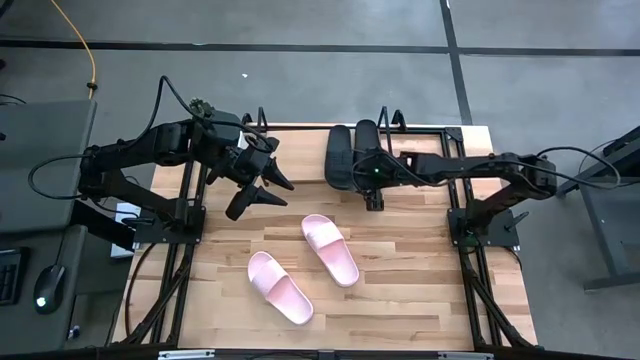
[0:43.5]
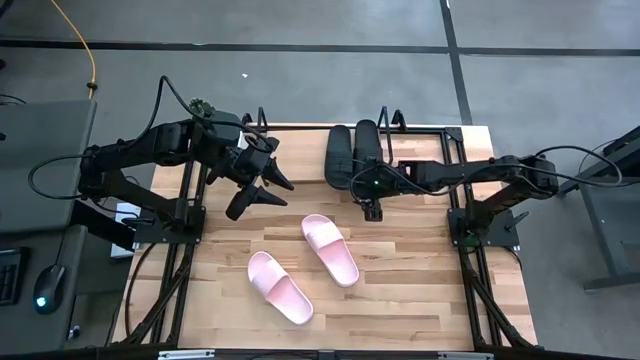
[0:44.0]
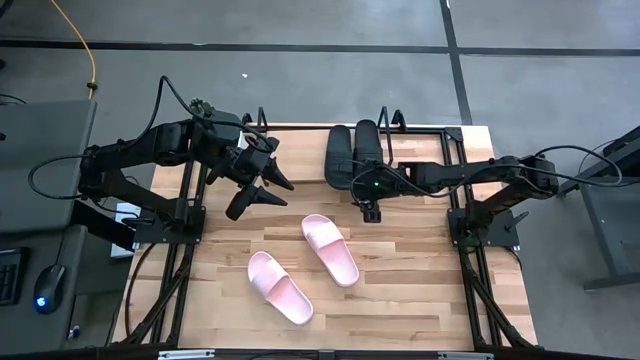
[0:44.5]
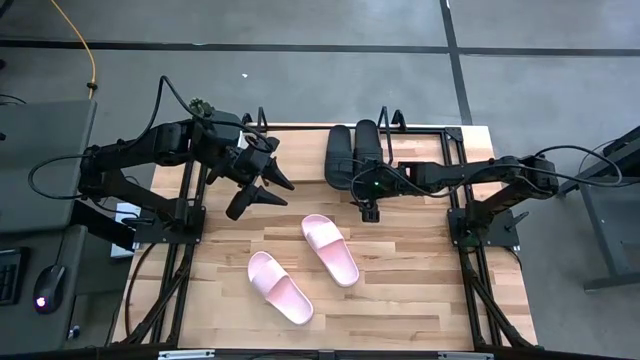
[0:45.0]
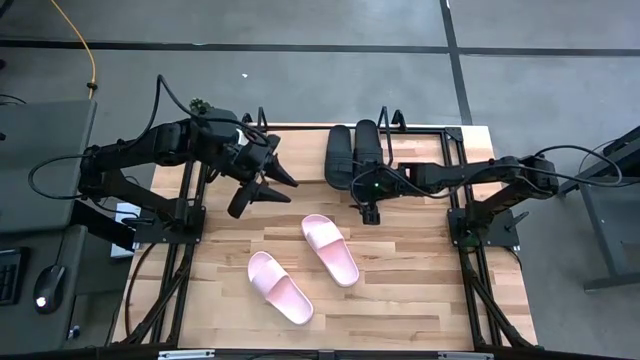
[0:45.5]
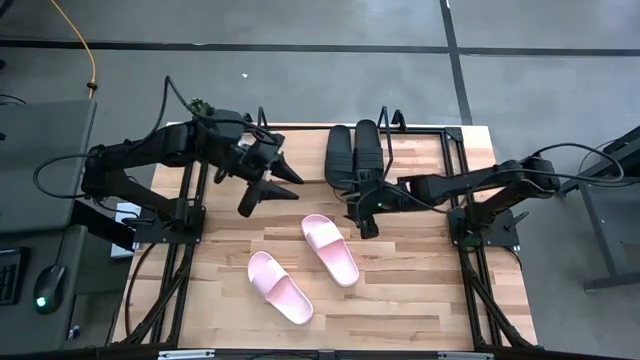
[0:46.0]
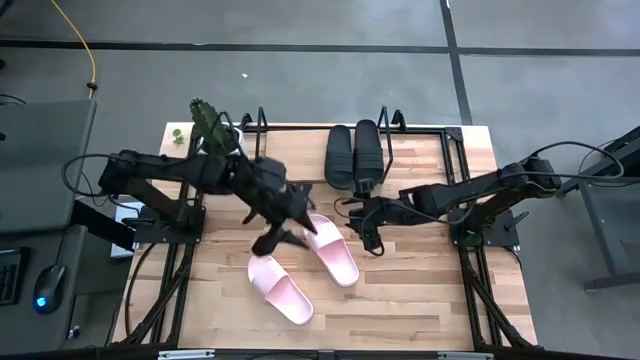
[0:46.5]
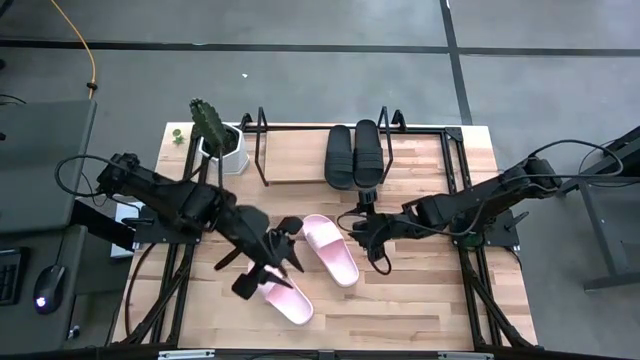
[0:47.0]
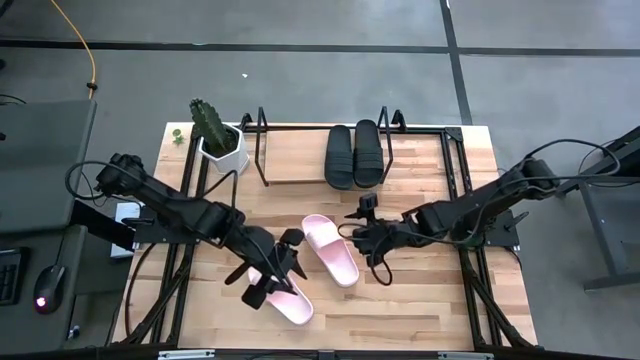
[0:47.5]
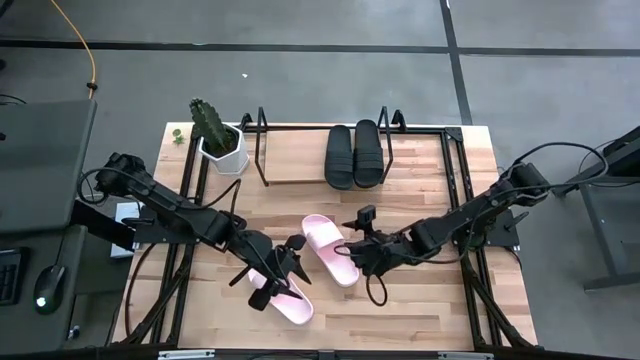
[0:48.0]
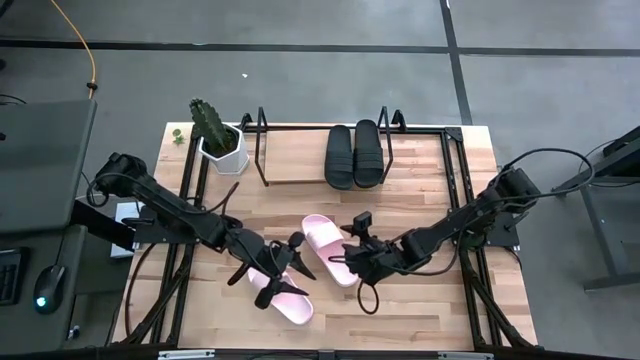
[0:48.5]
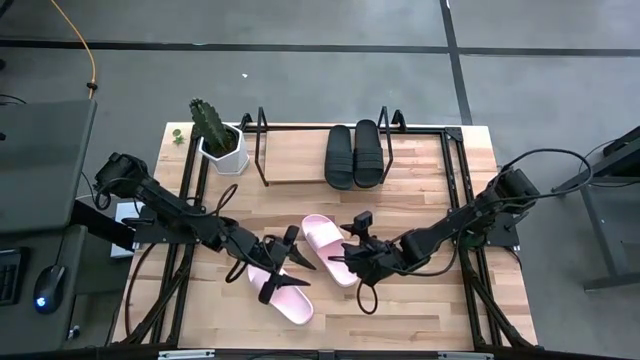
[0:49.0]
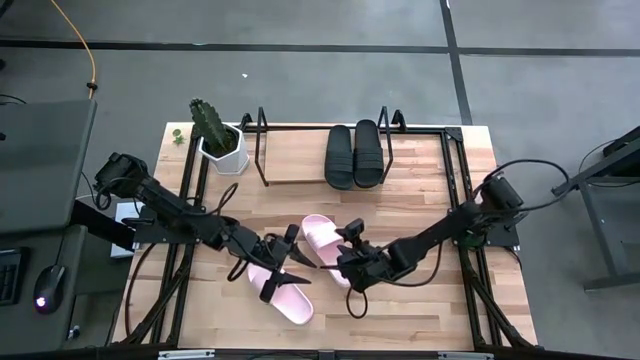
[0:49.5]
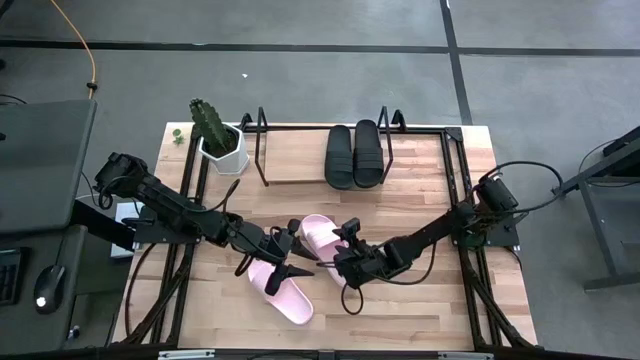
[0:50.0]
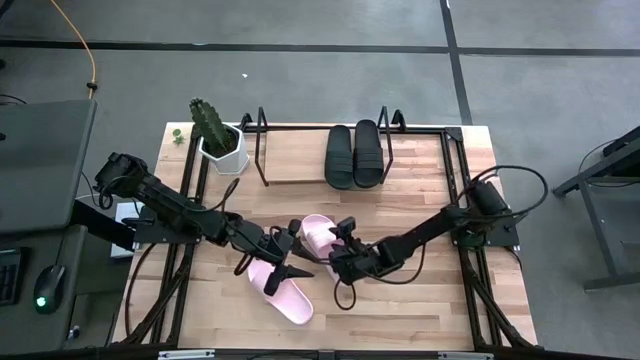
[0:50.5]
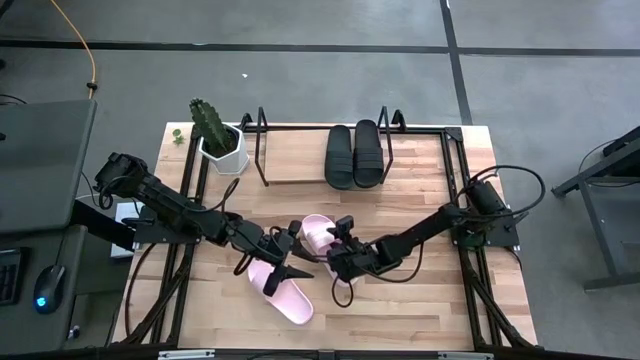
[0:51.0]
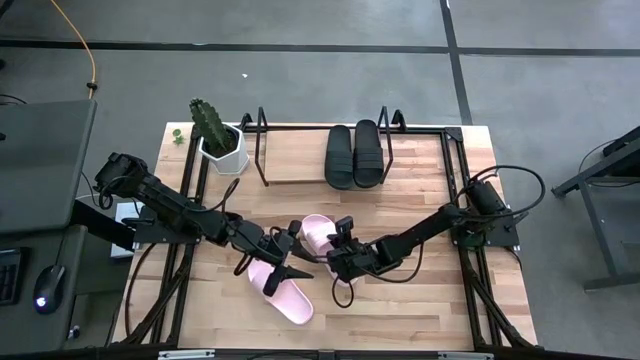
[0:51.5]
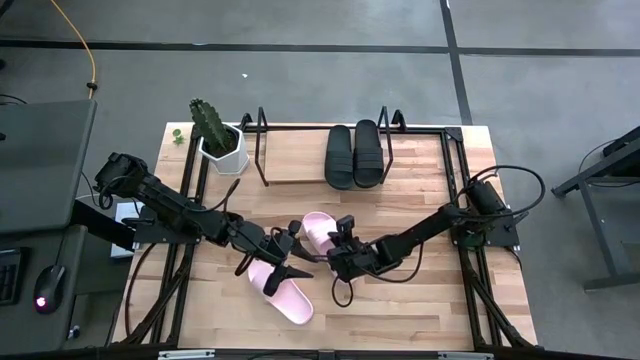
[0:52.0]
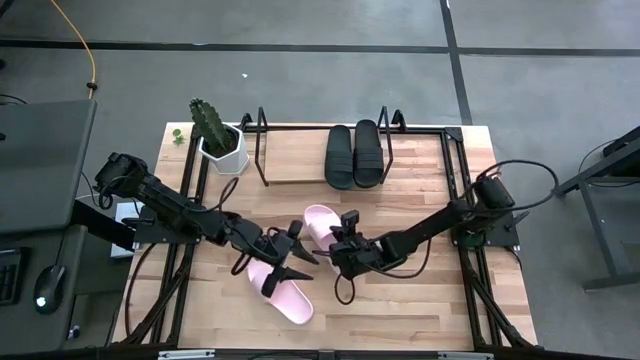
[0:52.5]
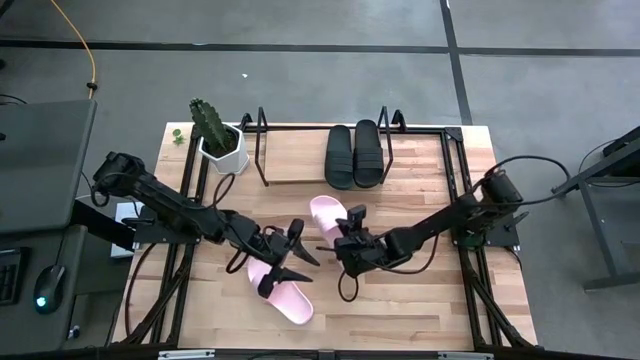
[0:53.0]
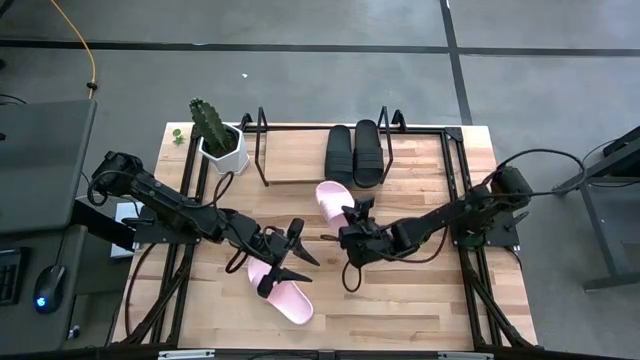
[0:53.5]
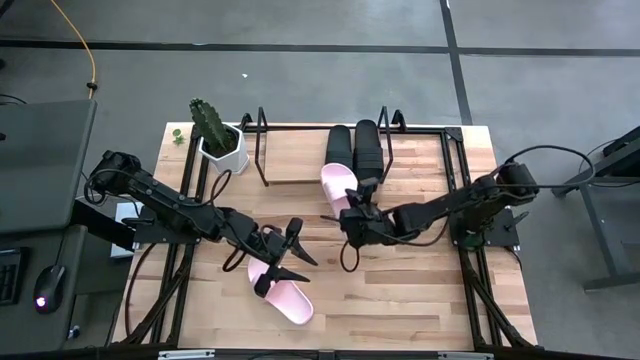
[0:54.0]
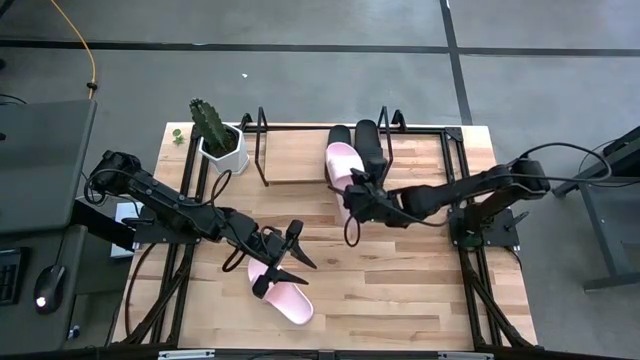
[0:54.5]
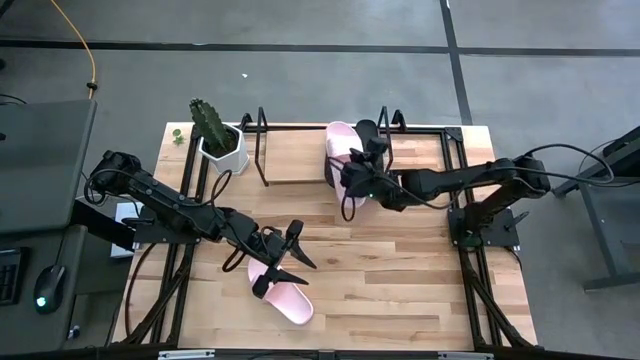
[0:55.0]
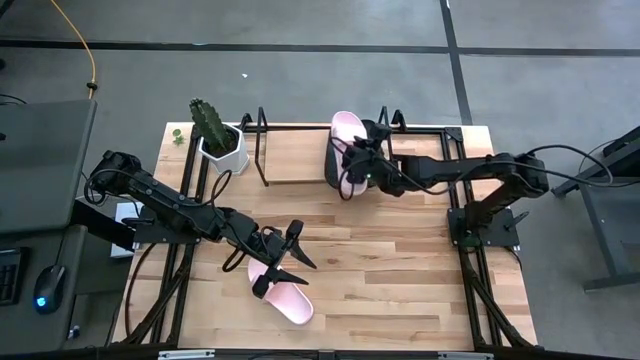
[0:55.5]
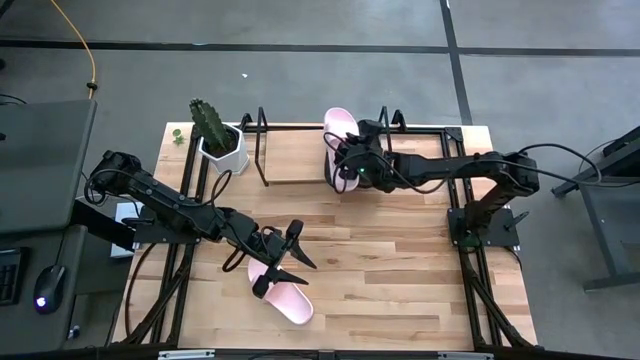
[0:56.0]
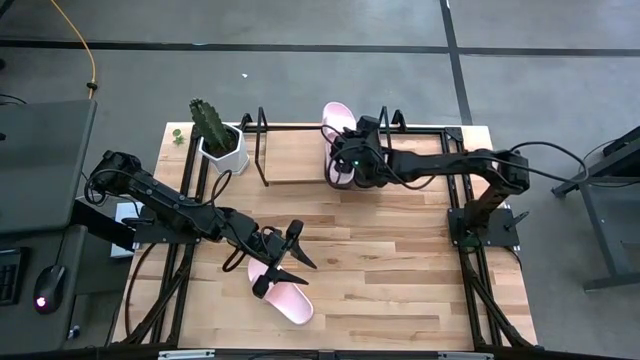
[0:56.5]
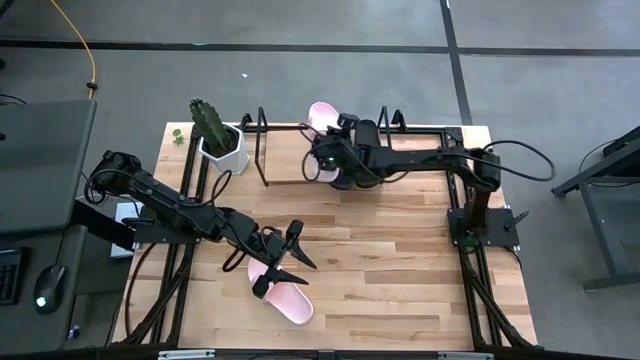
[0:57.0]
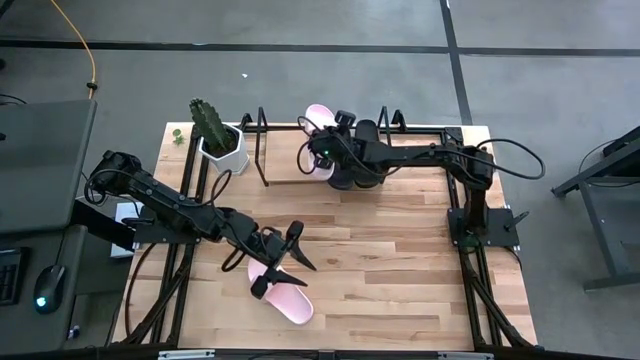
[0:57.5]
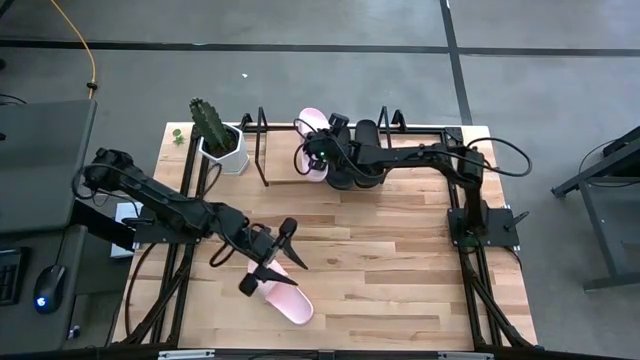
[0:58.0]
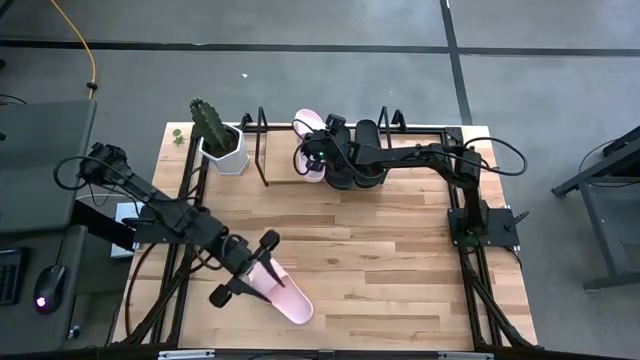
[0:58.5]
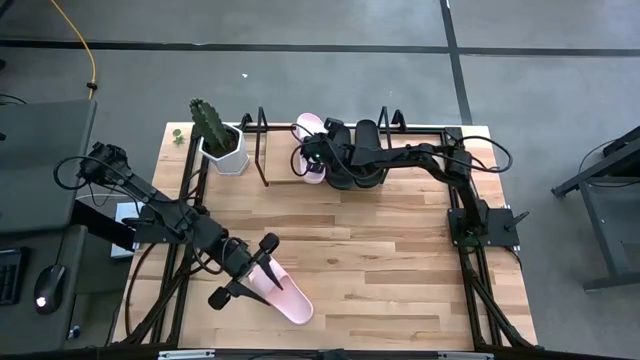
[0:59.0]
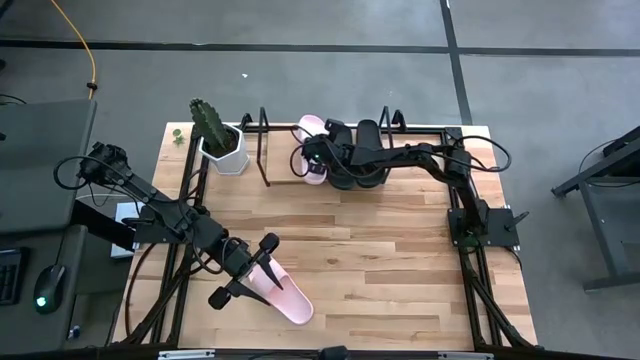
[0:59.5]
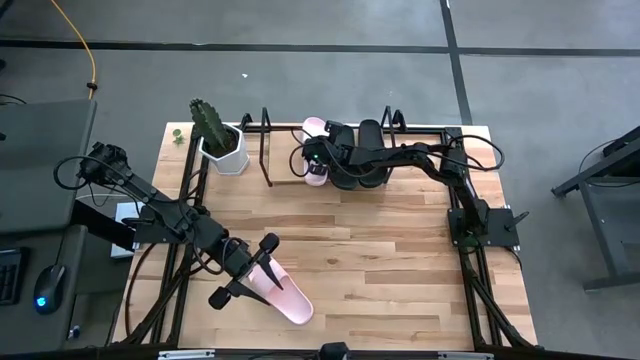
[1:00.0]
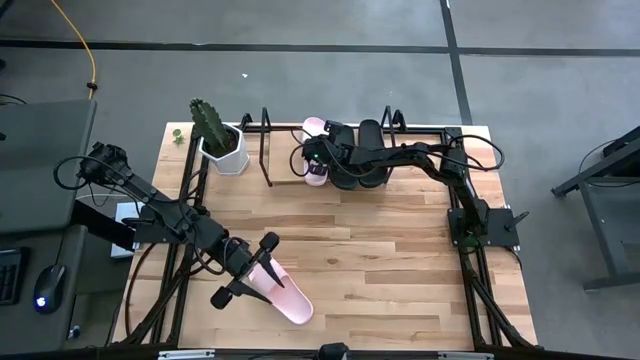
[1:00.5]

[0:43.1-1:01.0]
Task: Pick and place slides into the shelf
Put the top pink slides on the shelf

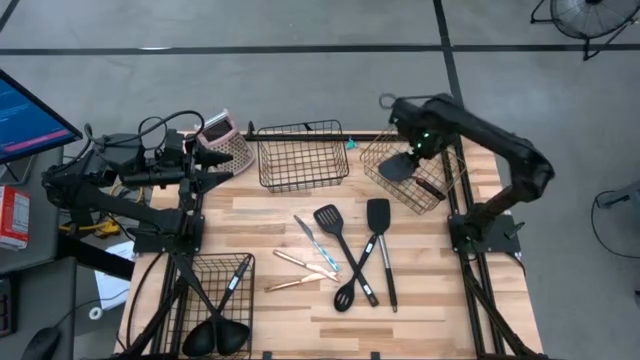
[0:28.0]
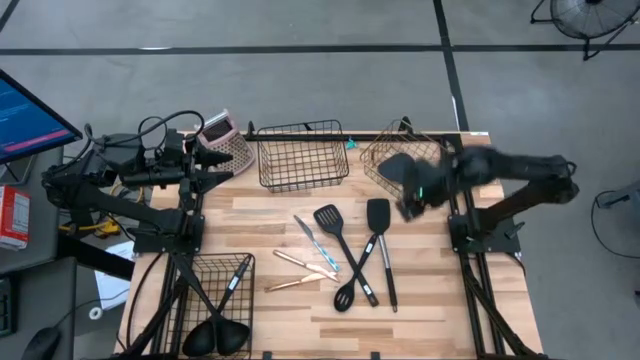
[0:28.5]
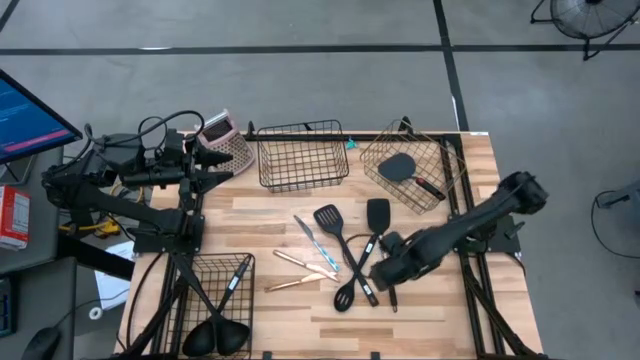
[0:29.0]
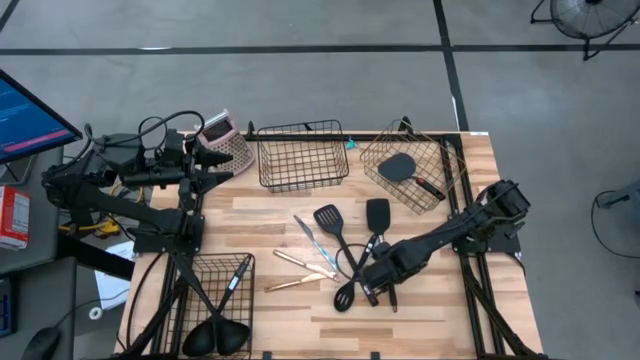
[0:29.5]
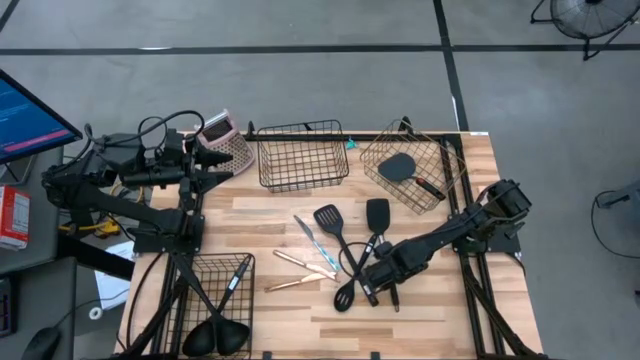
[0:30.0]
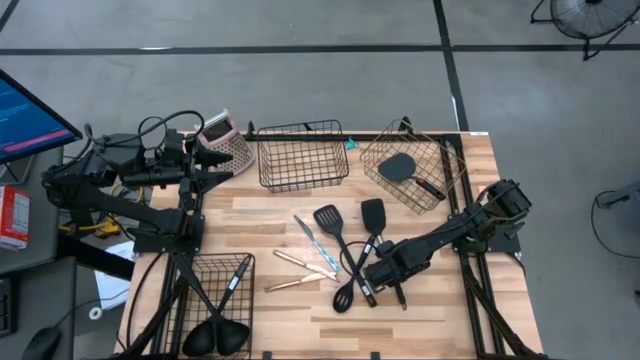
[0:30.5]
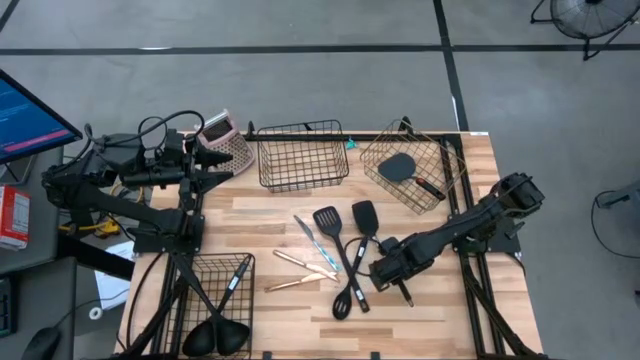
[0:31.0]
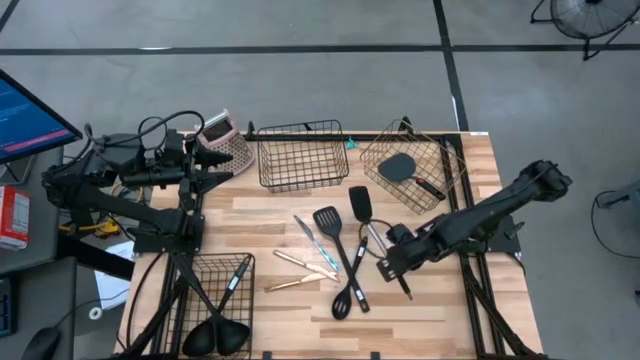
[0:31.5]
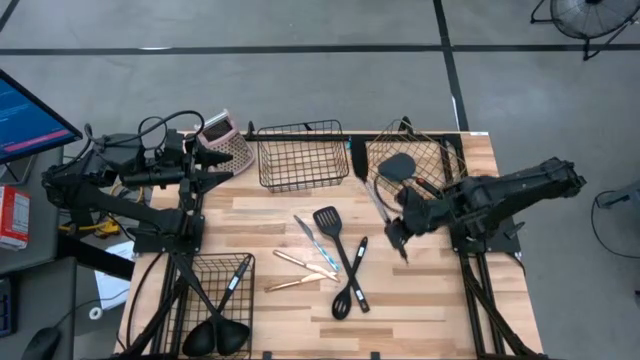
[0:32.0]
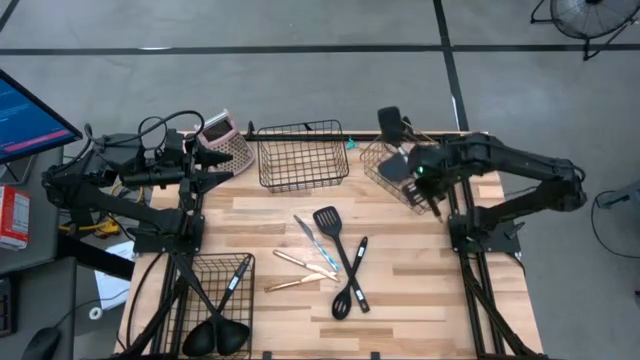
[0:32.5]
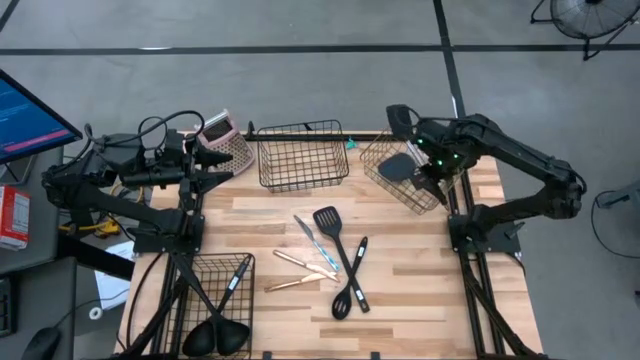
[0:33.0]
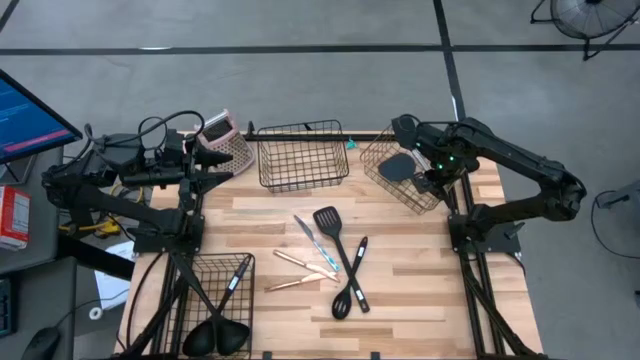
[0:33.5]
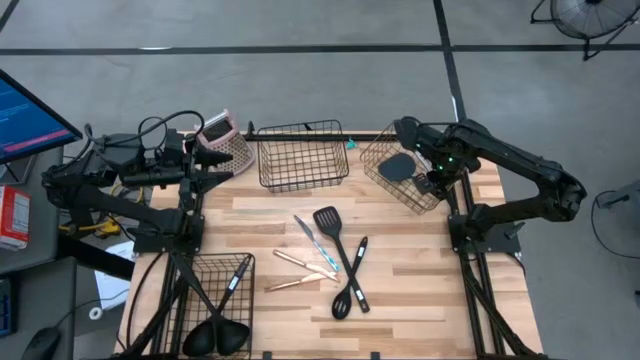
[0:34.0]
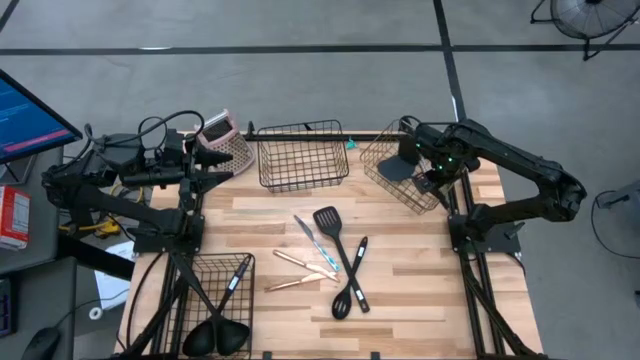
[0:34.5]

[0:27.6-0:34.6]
Task: Pick & Place Kitchen Items
Put the black spatula into the brown wire basket
